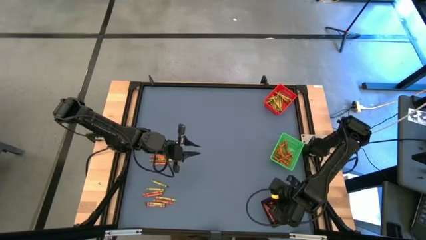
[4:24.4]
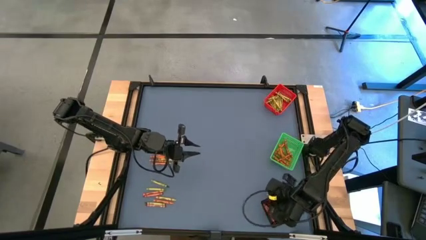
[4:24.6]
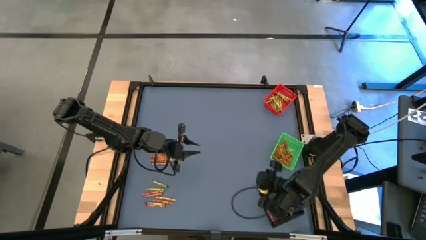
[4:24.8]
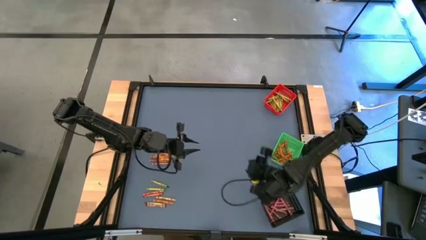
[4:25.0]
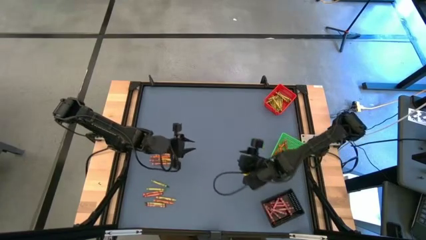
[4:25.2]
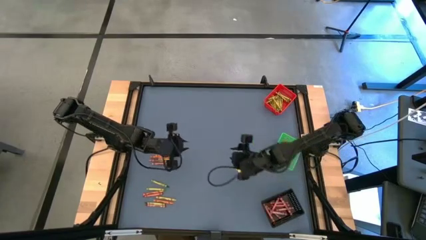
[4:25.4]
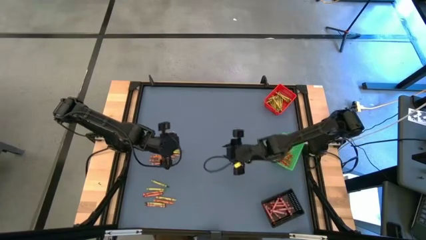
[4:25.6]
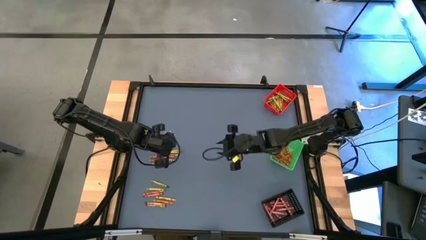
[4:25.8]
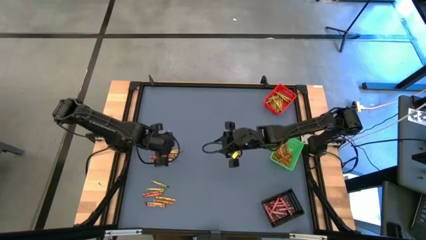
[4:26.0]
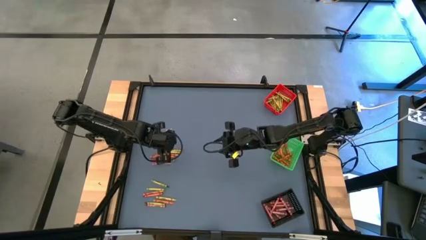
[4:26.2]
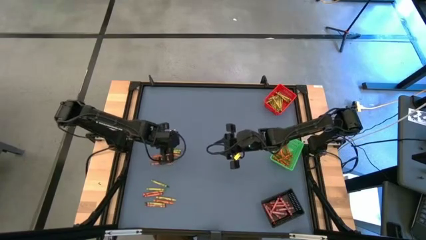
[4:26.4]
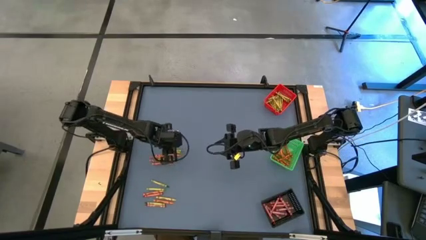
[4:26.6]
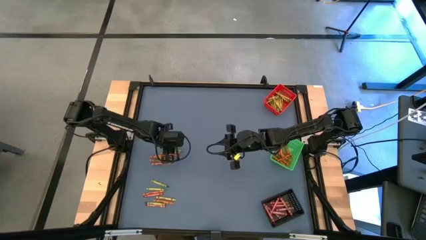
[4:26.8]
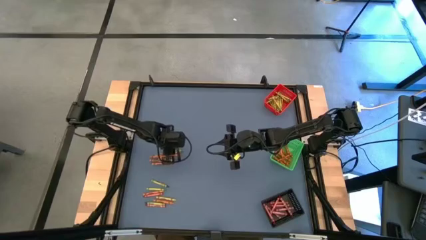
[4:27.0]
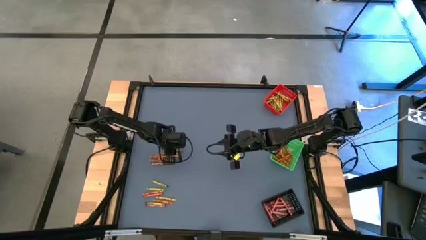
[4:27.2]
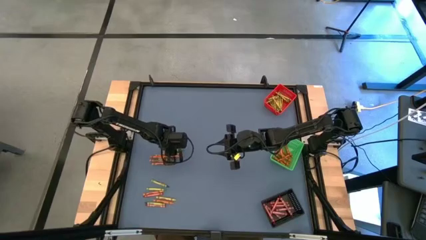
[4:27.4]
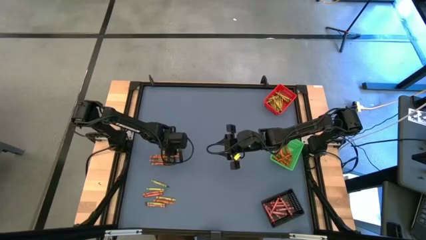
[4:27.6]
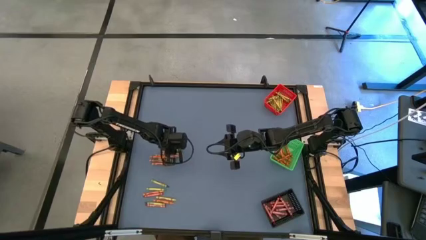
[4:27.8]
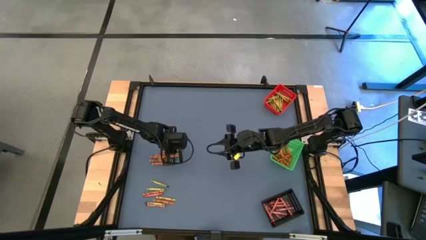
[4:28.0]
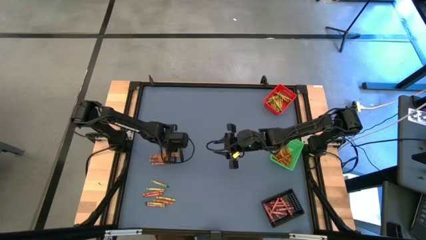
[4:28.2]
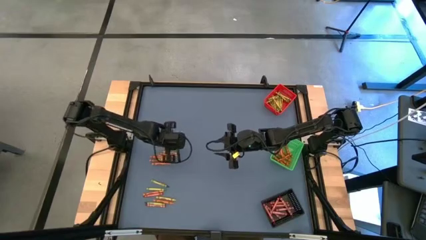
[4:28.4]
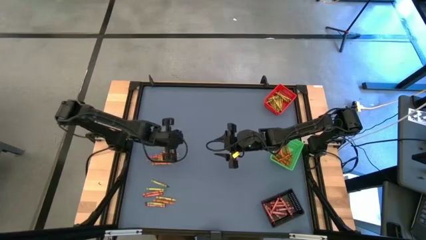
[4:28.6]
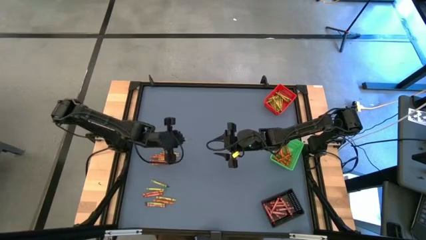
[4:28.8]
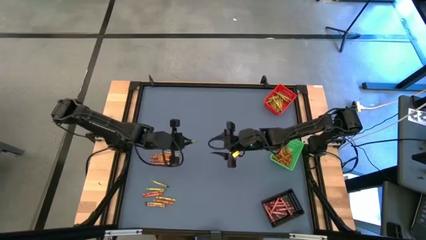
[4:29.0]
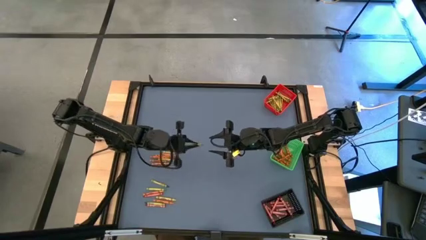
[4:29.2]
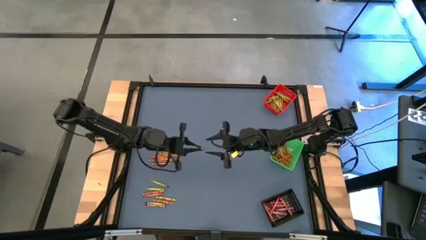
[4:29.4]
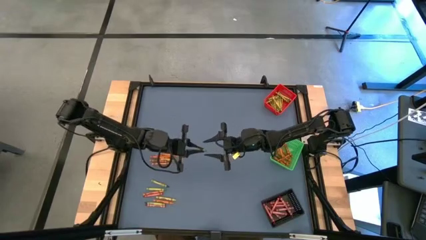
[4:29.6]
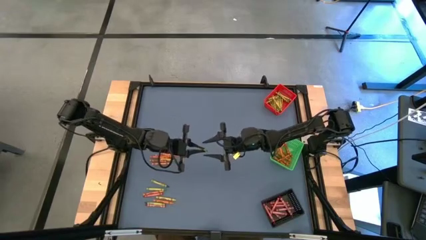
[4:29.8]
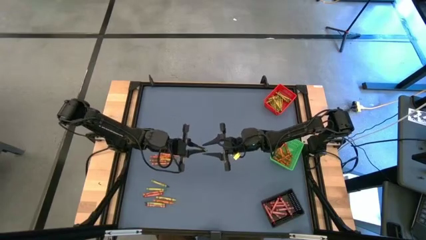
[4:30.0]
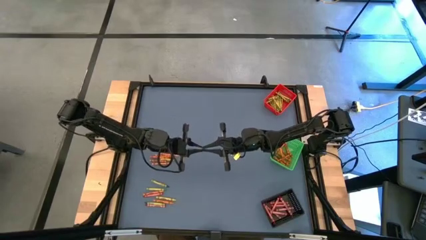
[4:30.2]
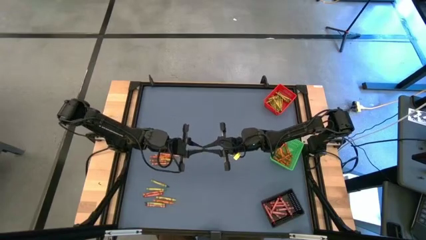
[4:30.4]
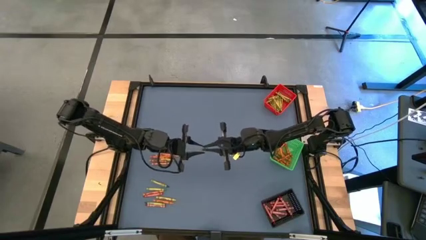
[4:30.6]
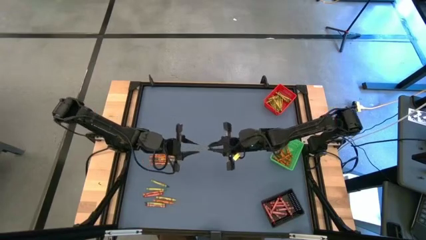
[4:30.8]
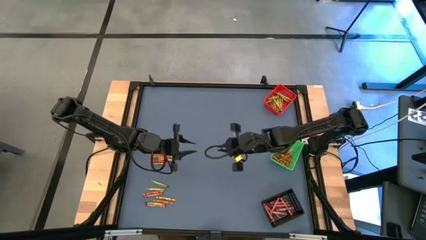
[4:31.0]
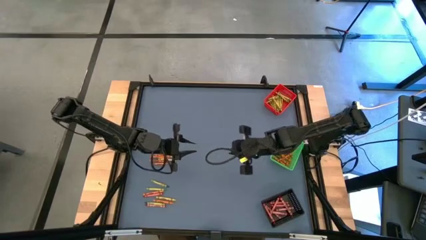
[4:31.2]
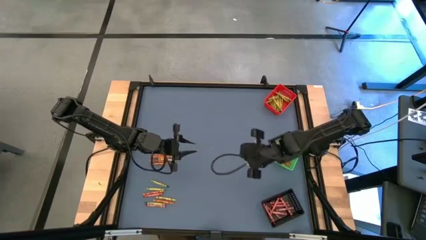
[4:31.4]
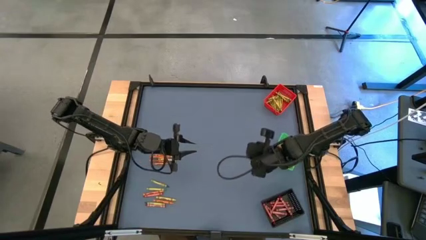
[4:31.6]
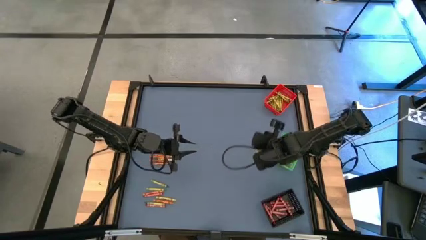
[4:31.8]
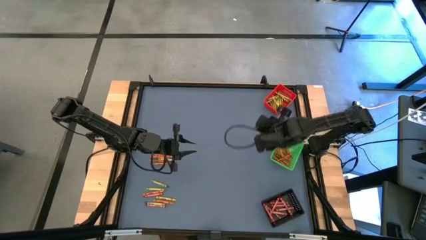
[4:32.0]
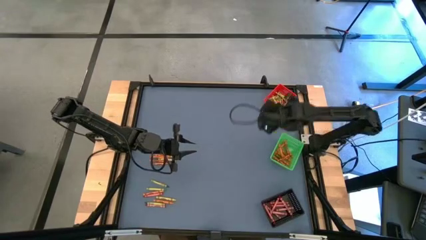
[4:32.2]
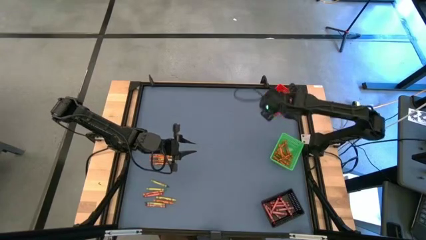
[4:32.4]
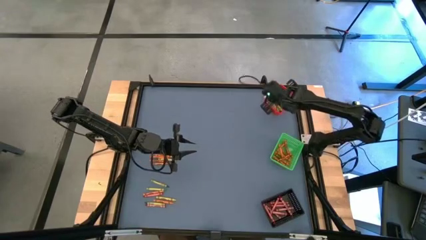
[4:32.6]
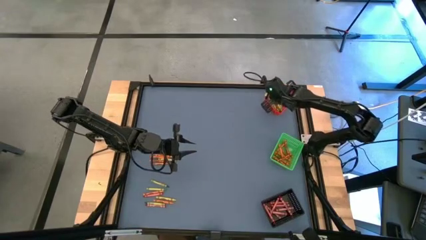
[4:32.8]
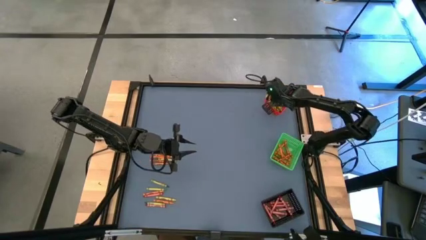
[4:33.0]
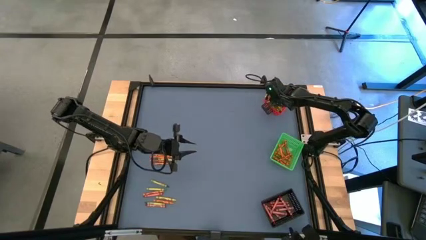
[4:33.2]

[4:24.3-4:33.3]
Task: Sort crayons
Put the green crayon into the red bin

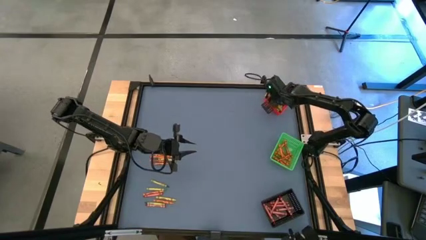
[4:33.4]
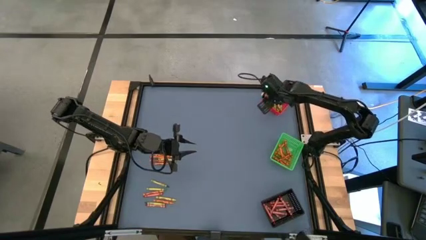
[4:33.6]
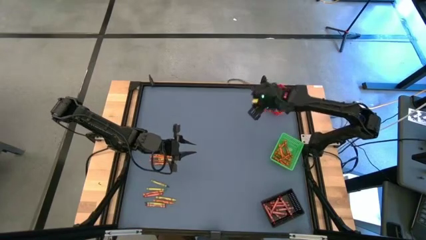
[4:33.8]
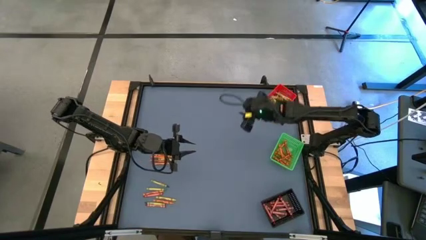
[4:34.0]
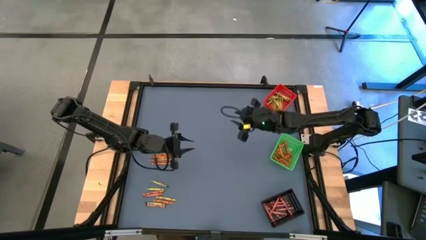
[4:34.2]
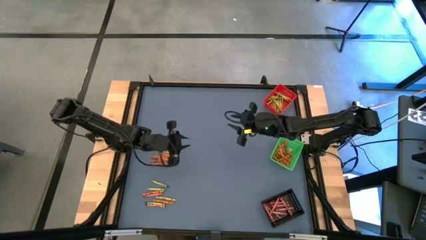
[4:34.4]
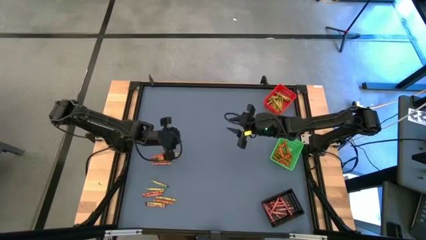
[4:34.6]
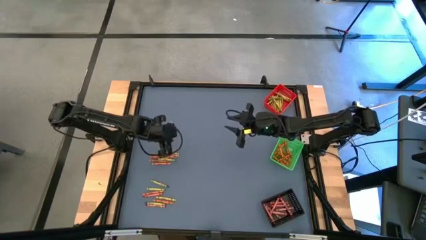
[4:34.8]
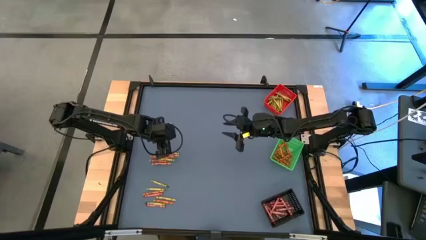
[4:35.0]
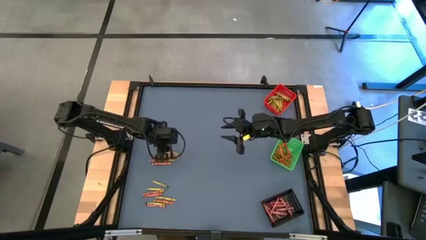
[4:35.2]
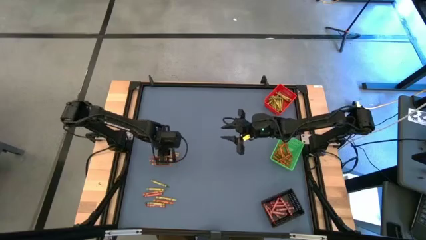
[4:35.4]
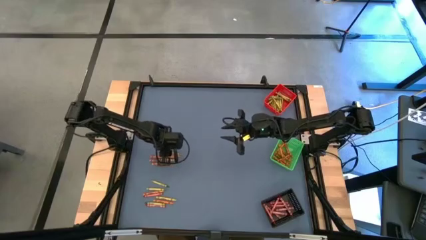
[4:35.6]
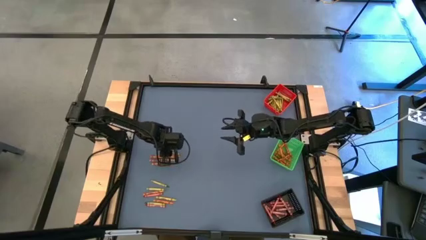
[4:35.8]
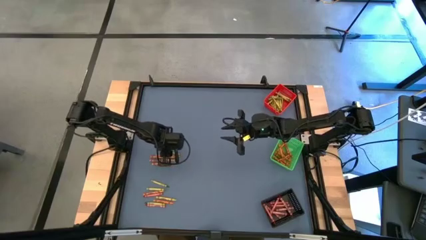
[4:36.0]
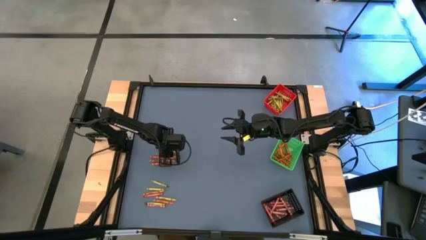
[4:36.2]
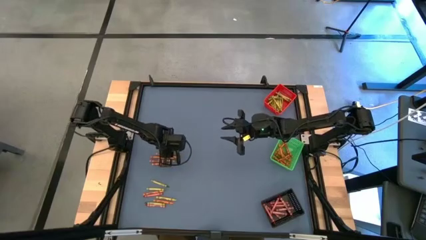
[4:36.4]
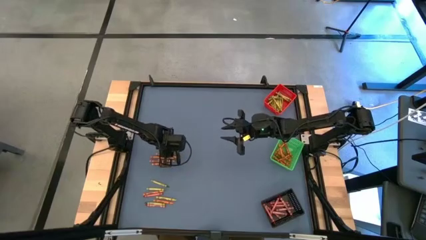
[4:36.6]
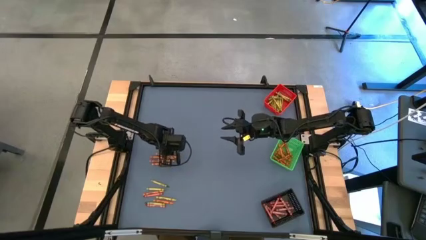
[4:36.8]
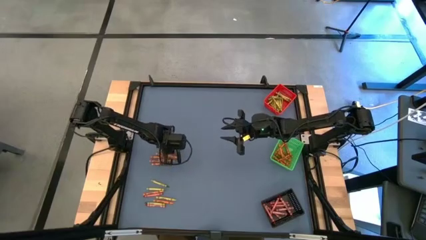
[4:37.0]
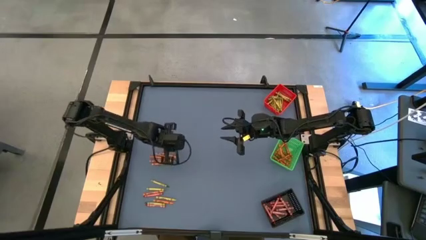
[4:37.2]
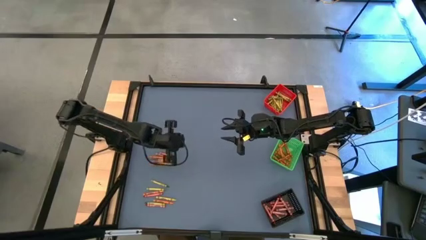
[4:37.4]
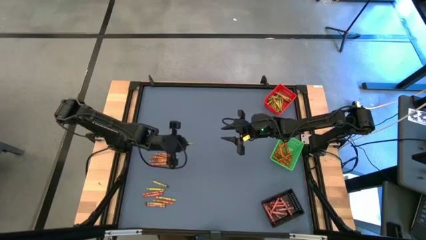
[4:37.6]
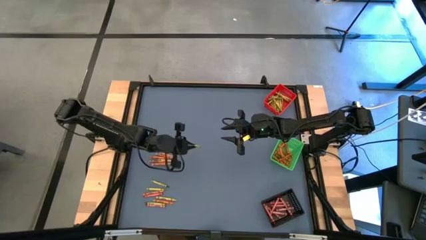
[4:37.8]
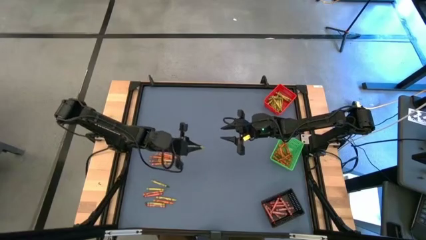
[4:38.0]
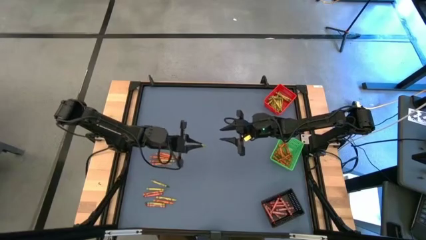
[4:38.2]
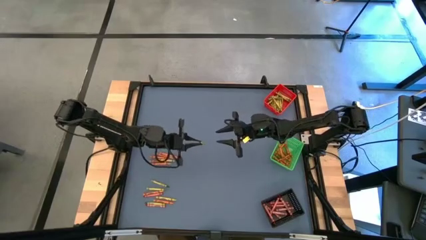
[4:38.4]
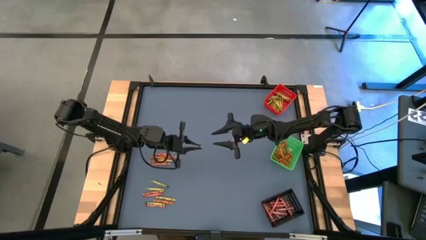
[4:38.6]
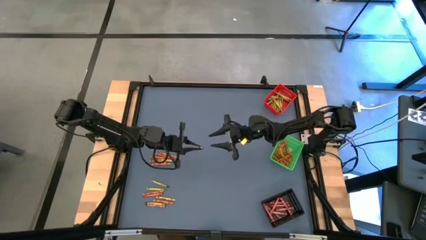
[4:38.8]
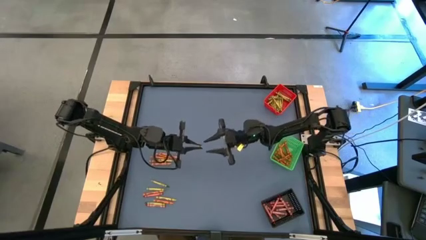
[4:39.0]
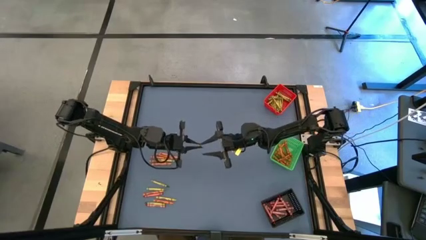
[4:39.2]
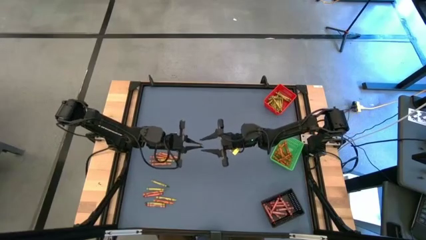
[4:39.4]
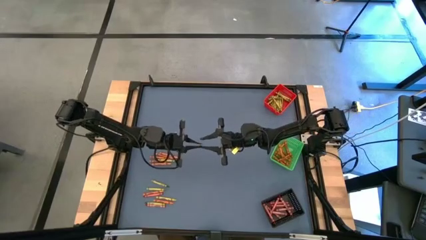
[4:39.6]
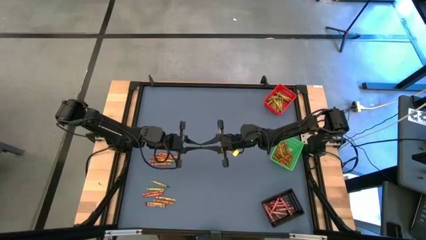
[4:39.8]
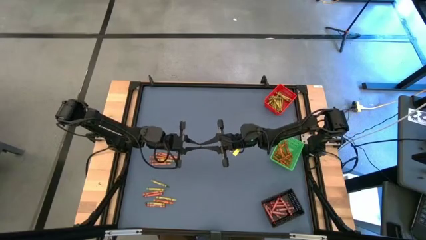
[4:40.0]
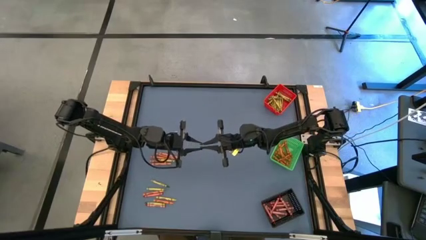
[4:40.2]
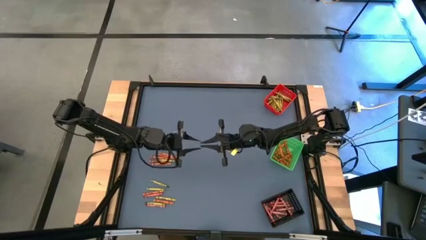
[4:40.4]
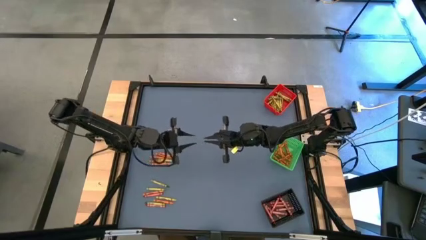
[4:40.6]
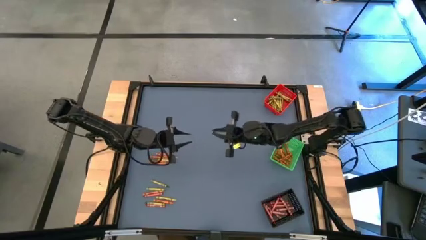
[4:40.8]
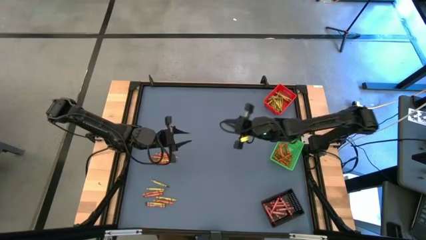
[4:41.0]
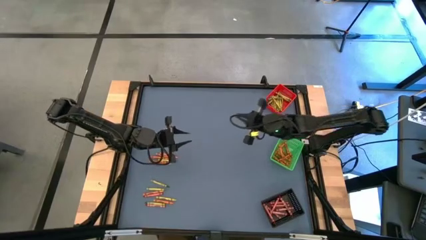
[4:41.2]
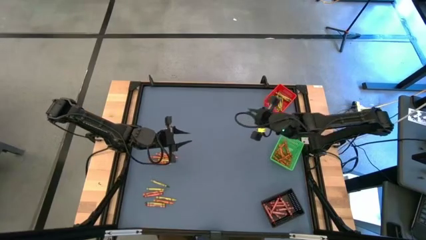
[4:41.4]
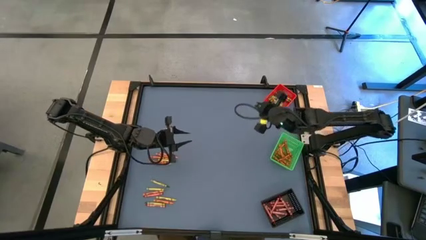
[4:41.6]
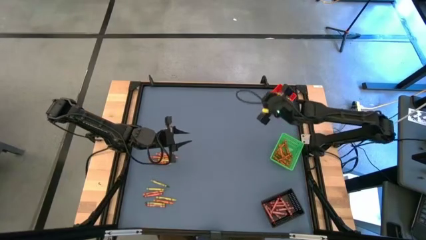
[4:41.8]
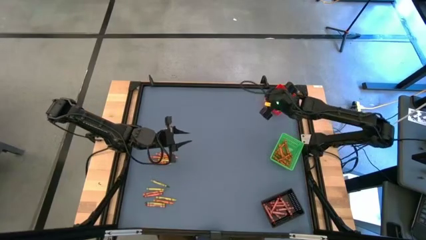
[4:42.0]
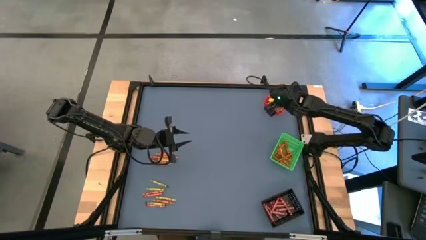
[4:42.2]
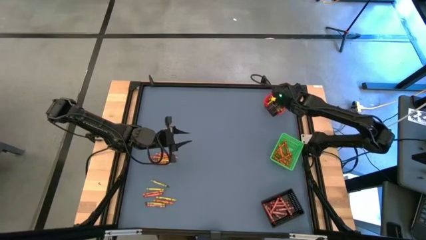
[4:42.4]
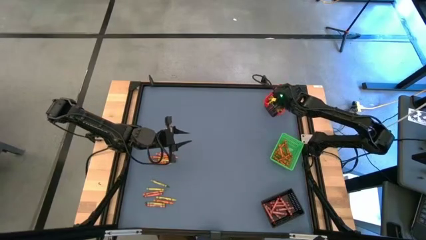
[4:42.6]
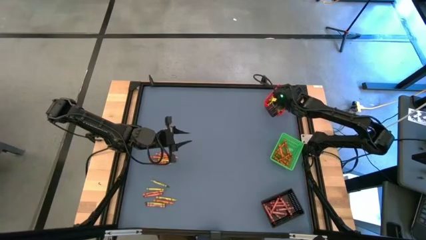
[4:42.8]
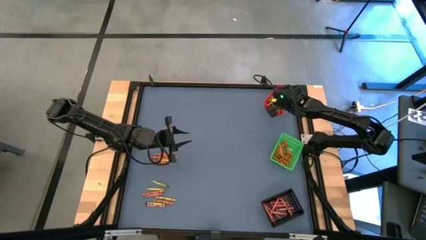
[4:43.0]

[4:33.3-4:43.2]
Put the green crayon into the red bin
